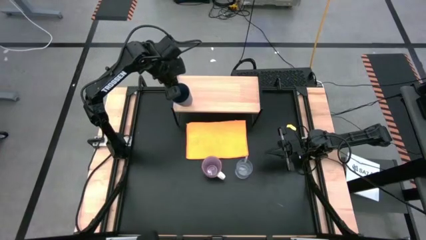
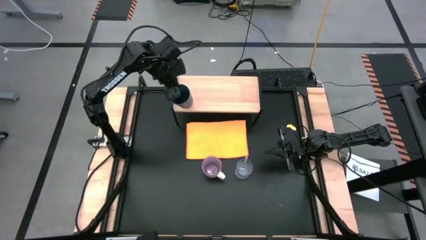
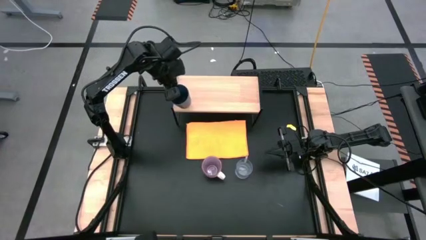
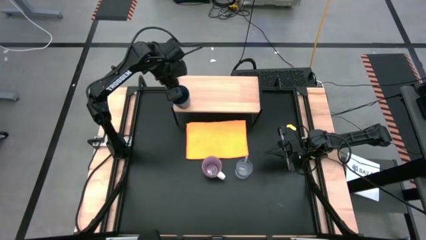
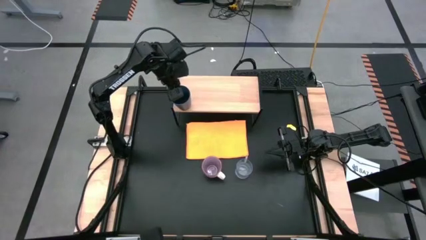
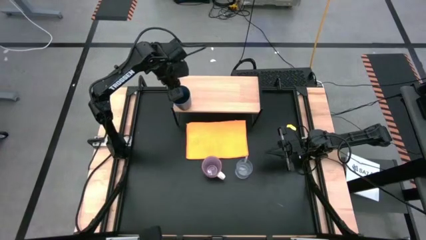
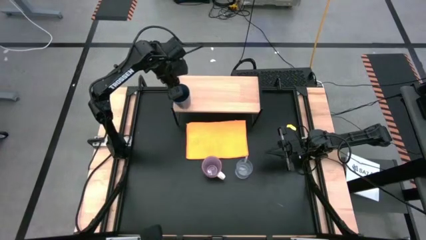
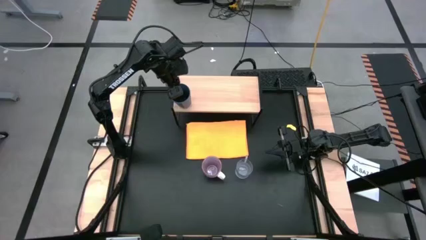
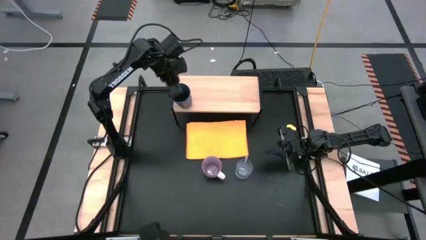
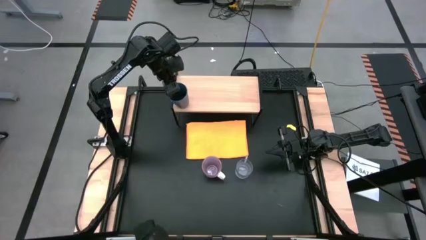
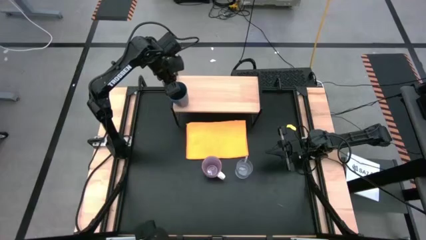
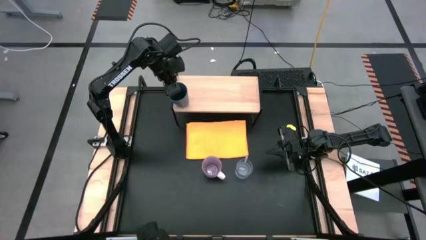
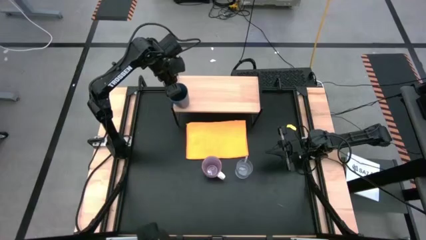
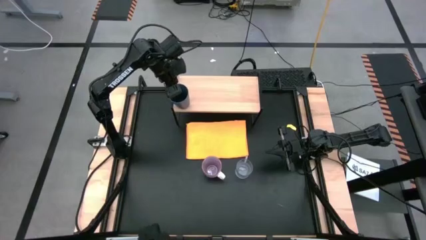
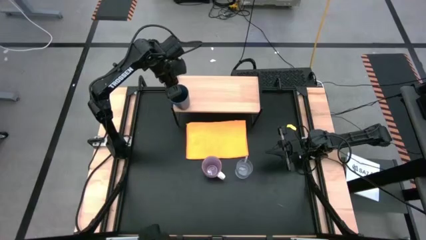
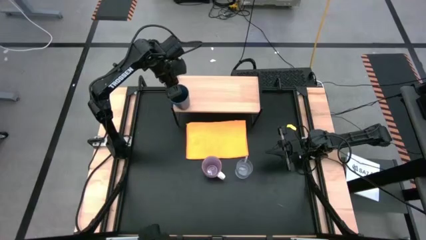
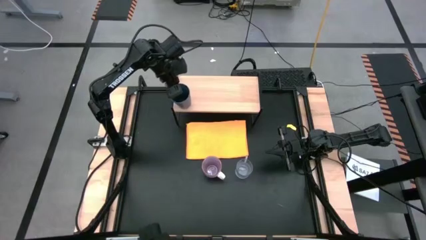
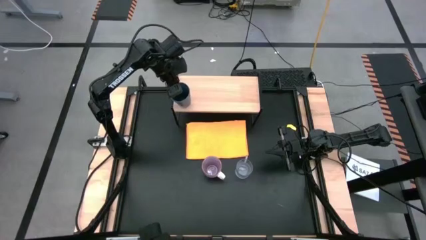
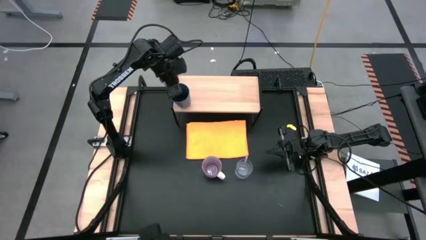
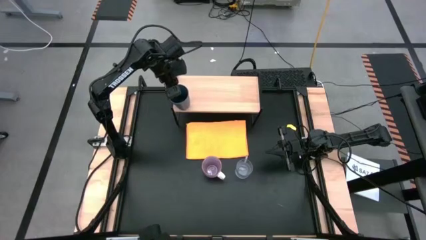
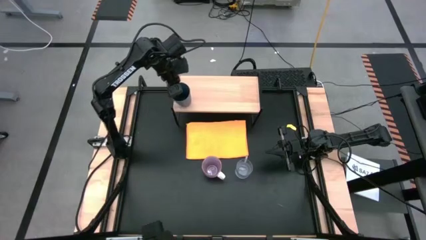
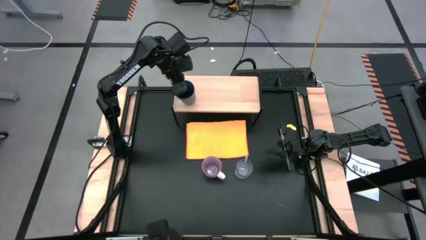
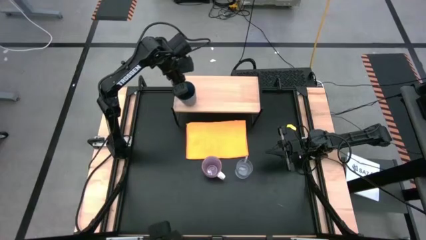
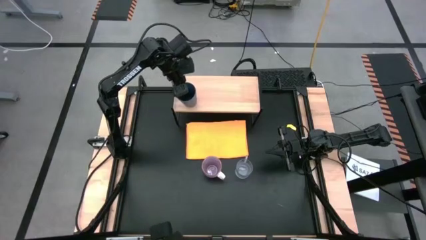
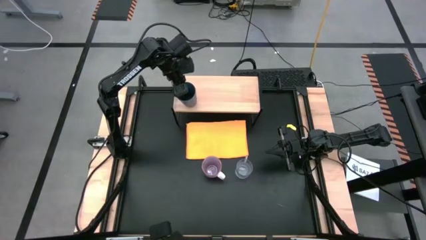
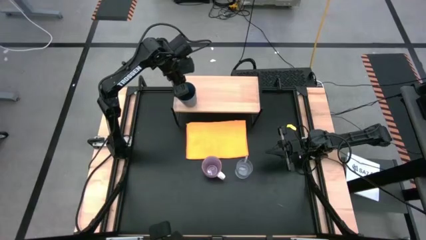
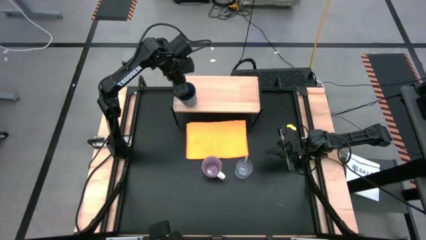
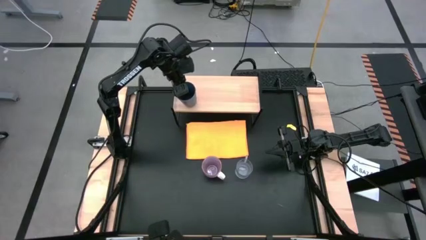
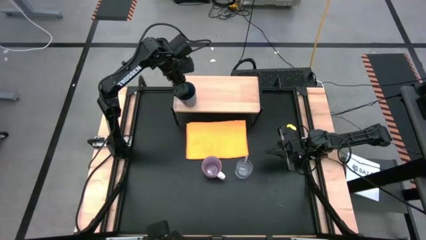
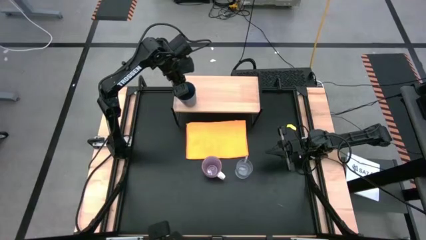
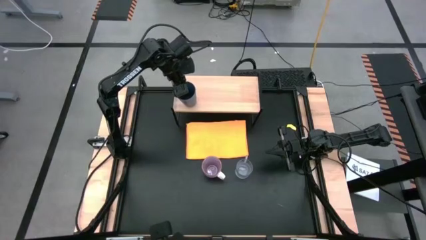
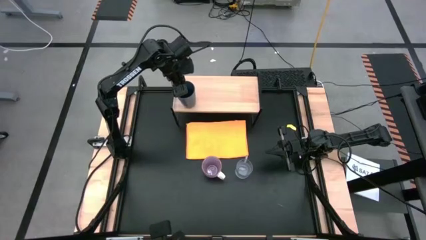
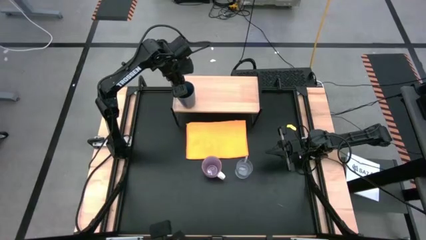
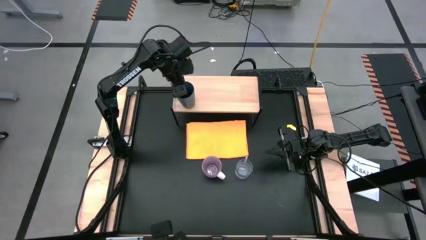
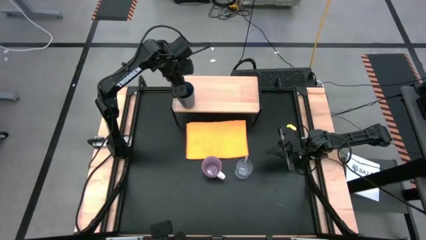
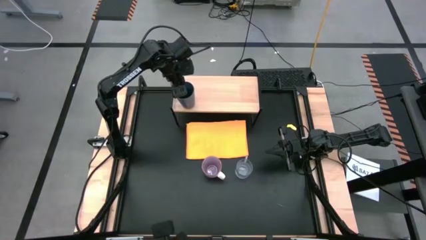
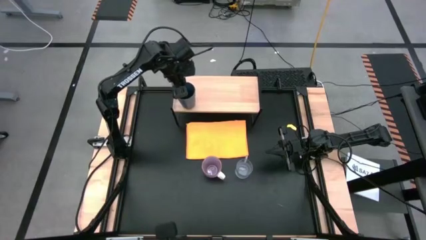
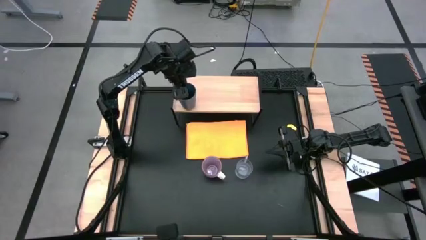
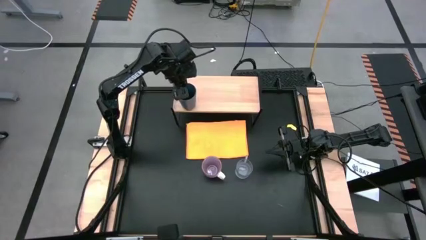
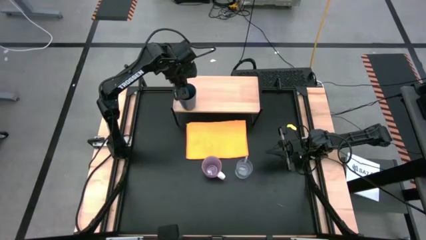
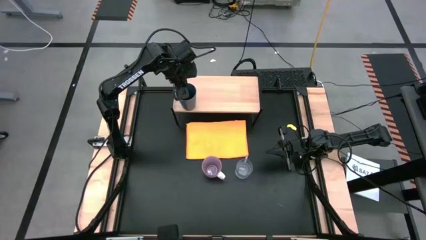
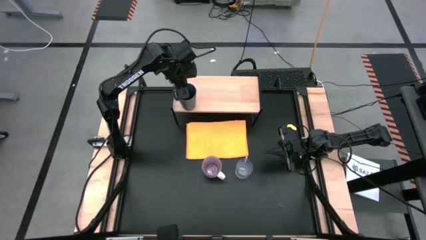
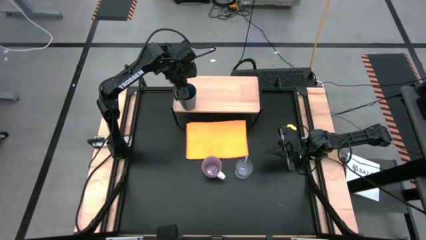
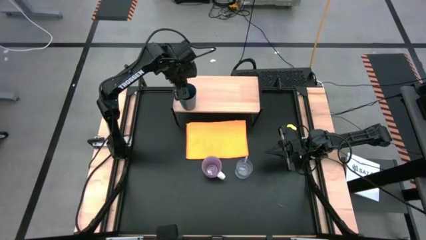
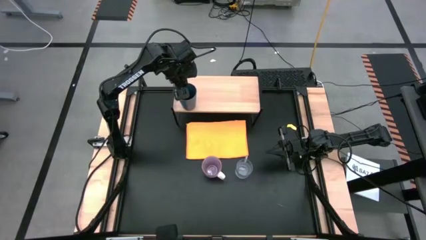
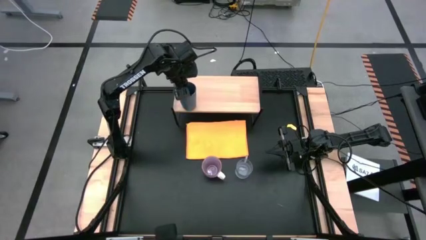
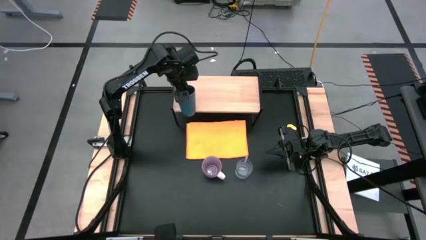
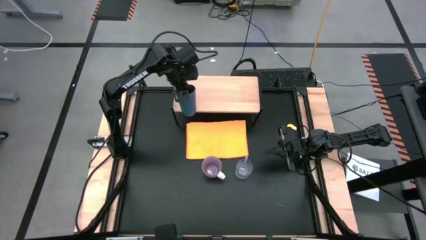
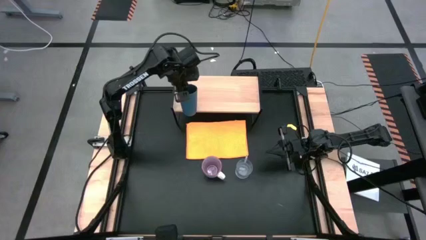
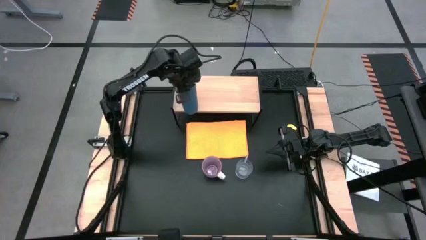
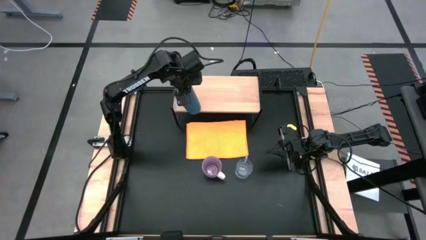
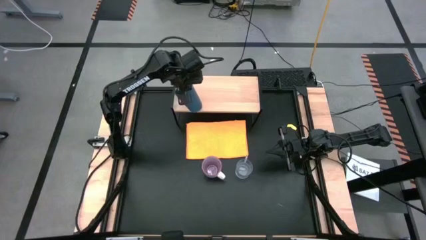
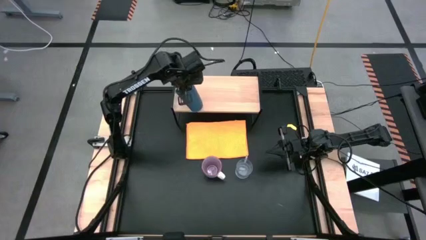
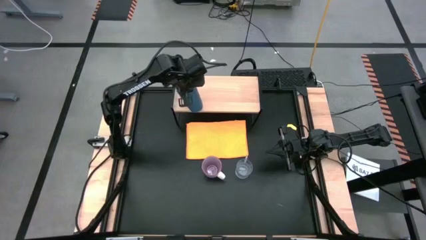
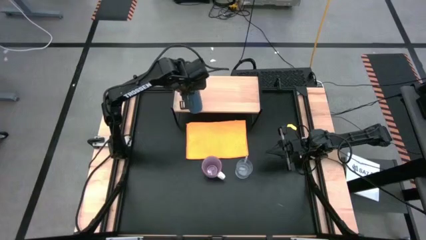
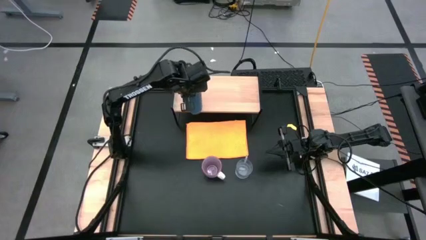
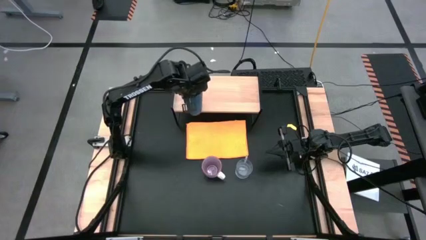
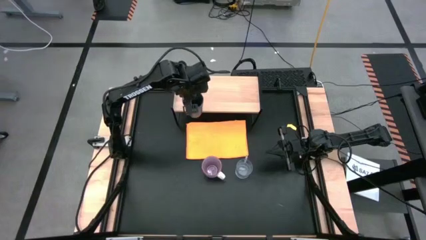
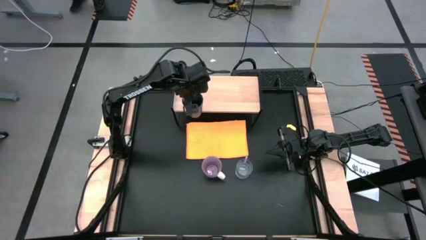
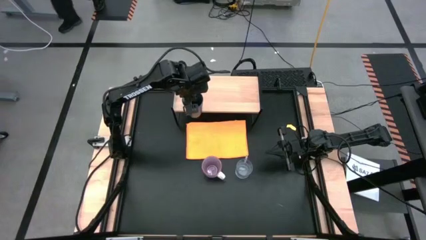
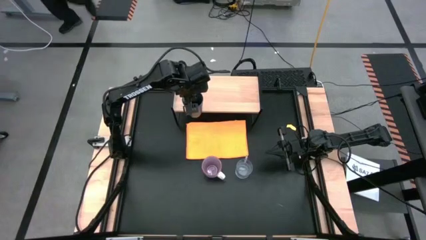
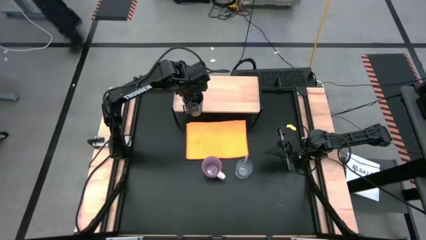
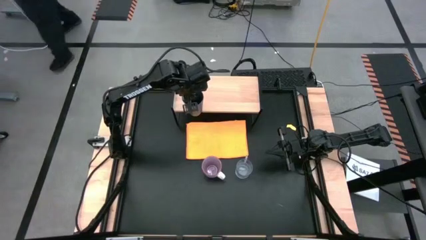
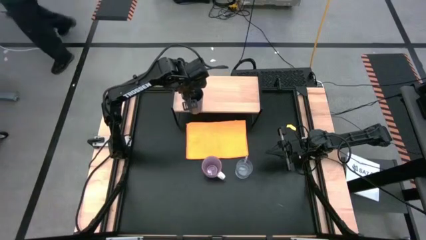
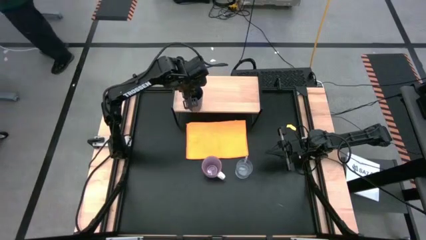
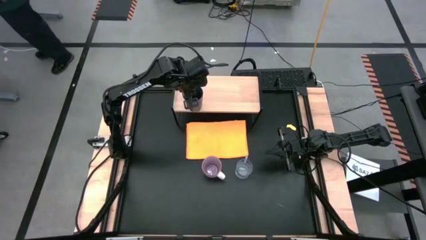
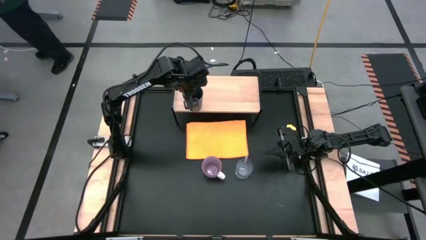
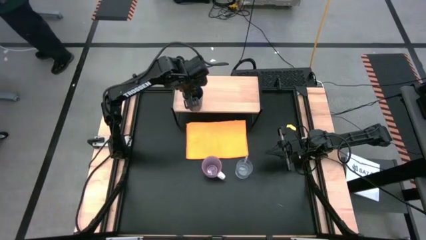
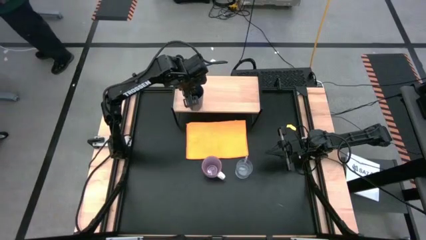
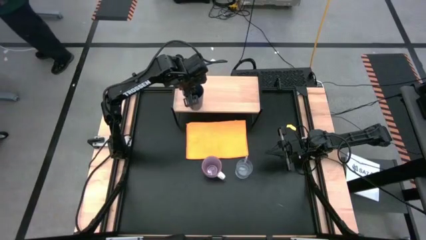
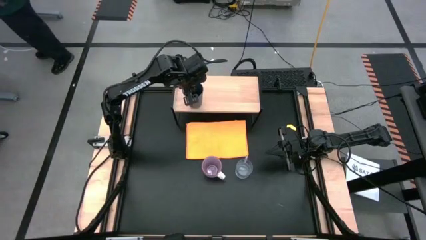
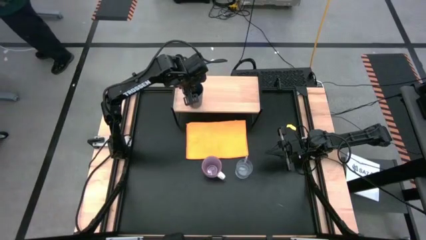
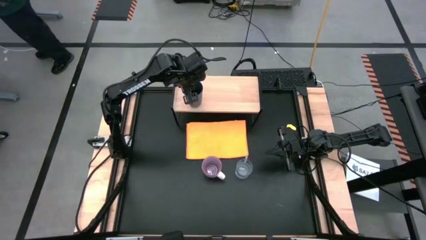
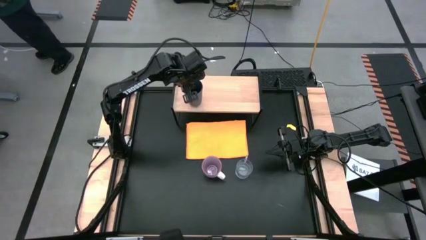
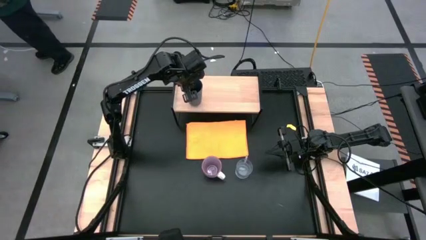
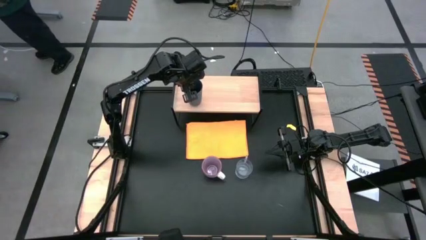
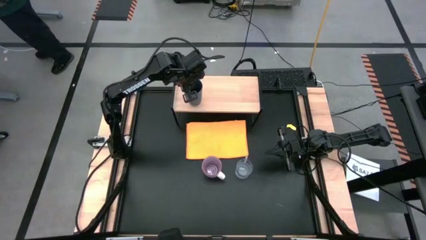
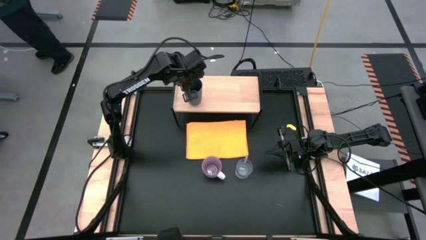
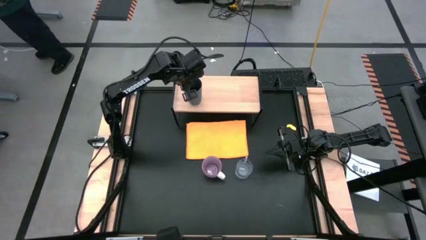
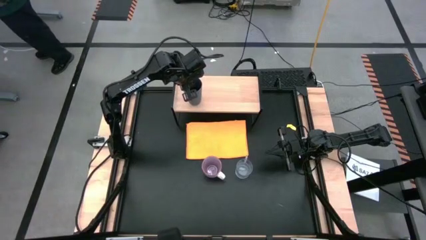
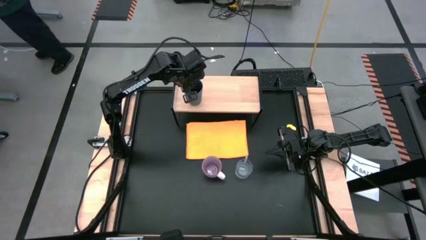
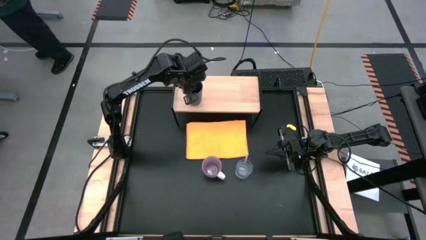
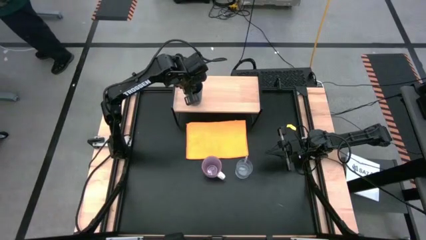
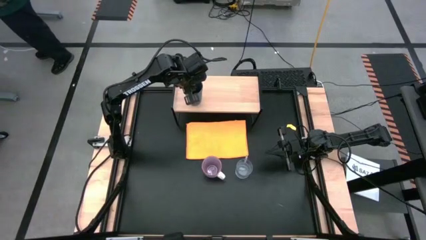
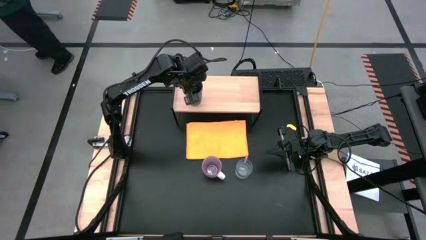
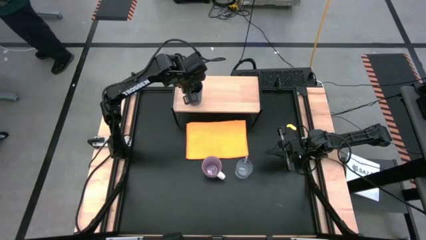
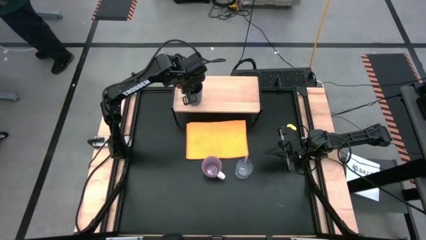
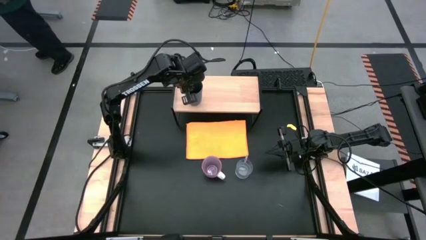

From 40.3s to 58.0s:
Task: Stack small to large cups/mugs on shelf
Put the blue cup on the shelf
